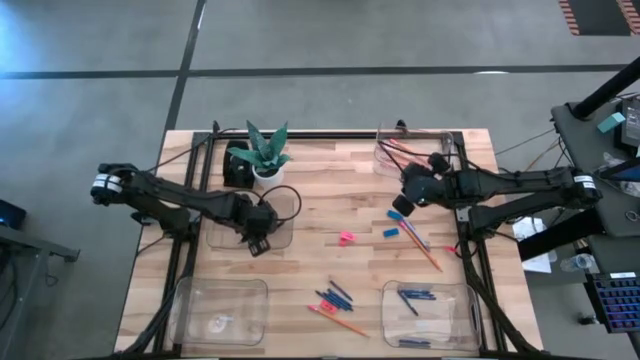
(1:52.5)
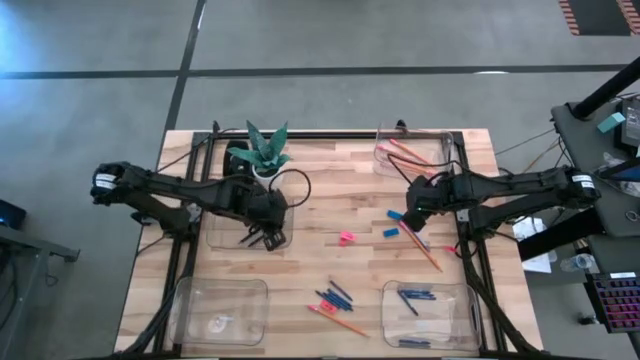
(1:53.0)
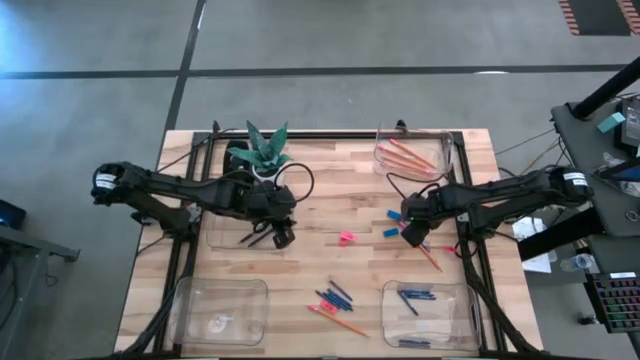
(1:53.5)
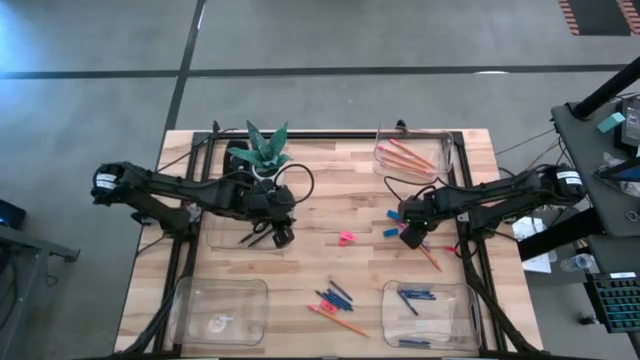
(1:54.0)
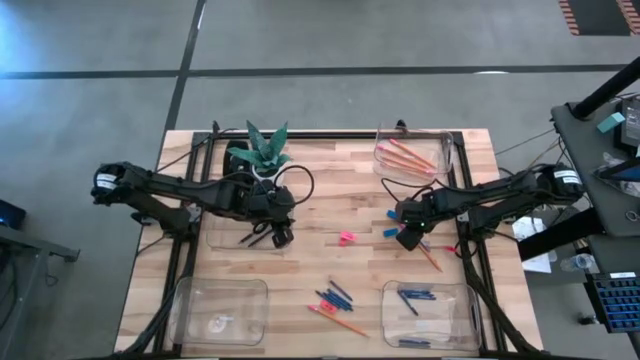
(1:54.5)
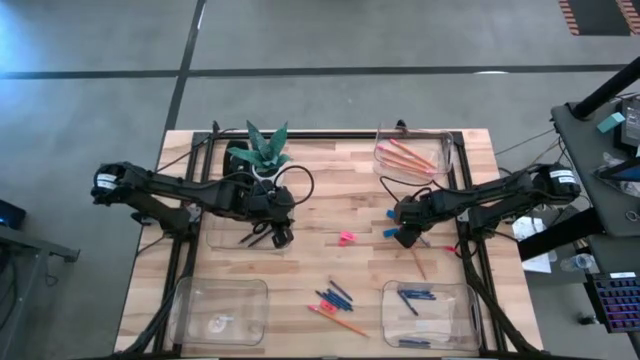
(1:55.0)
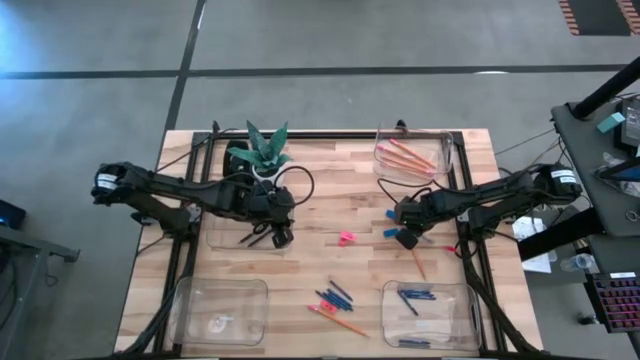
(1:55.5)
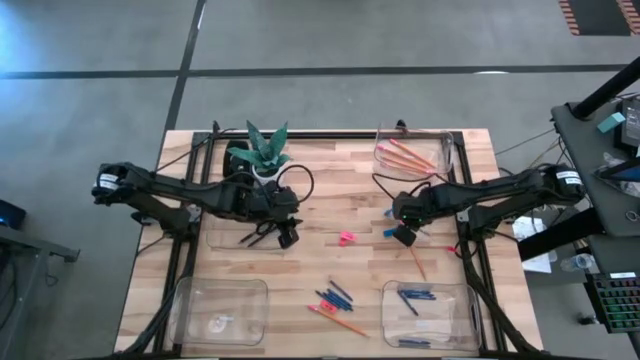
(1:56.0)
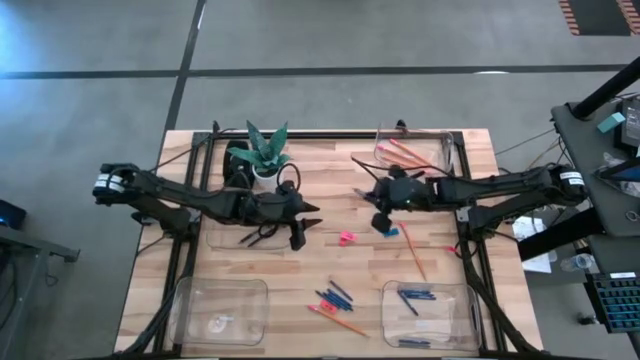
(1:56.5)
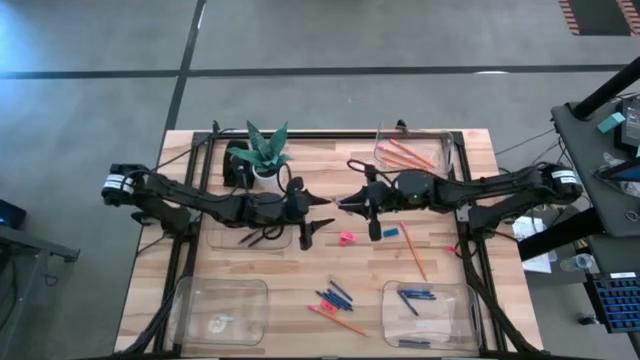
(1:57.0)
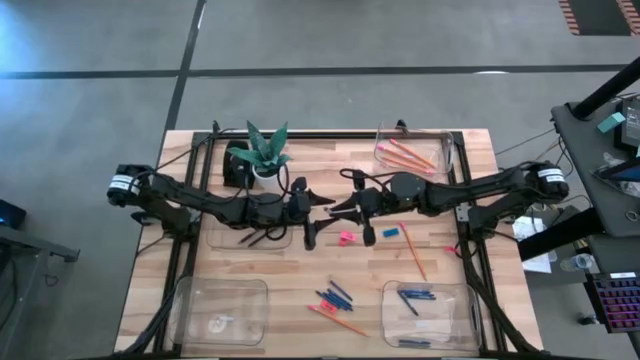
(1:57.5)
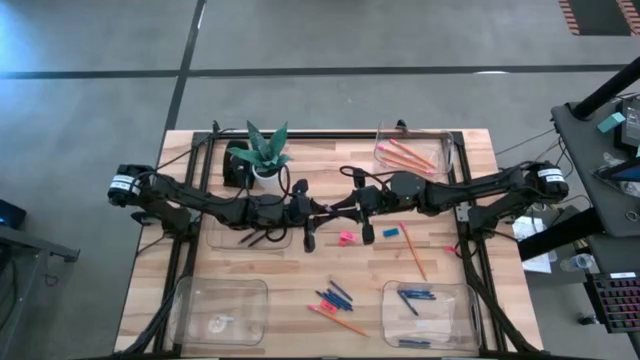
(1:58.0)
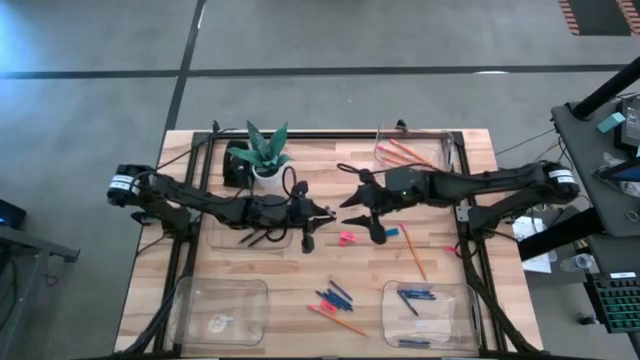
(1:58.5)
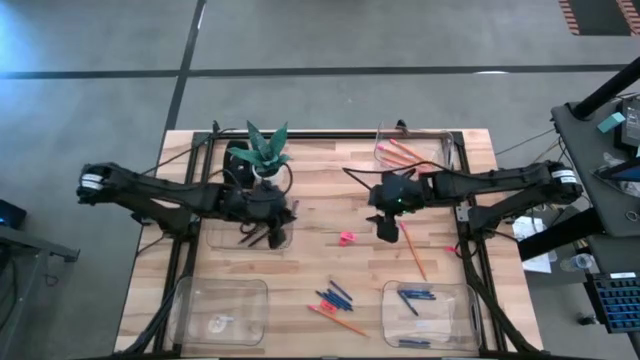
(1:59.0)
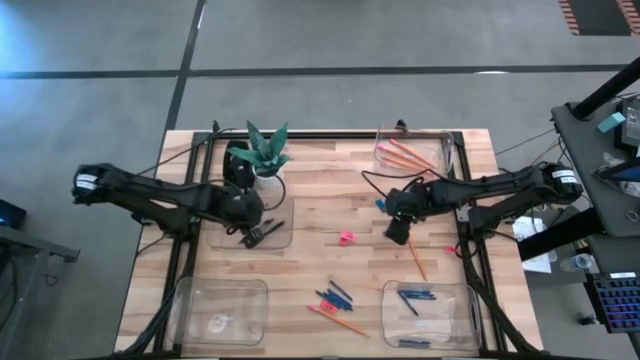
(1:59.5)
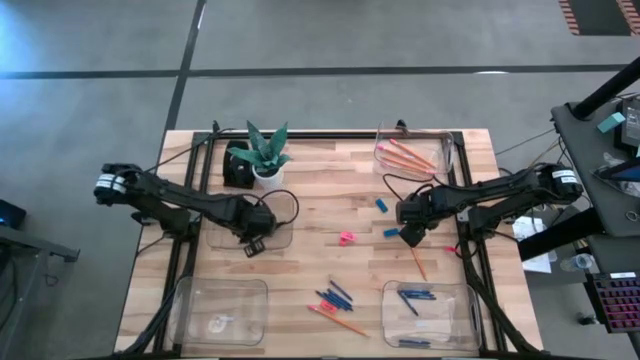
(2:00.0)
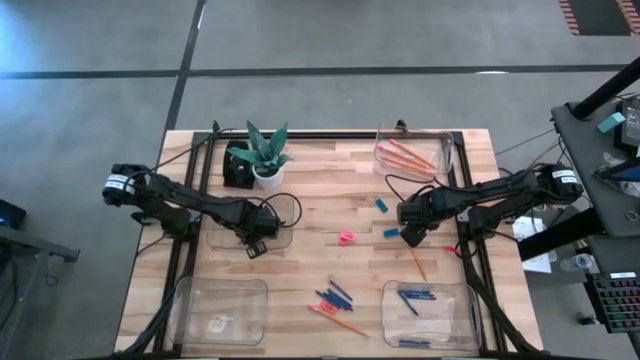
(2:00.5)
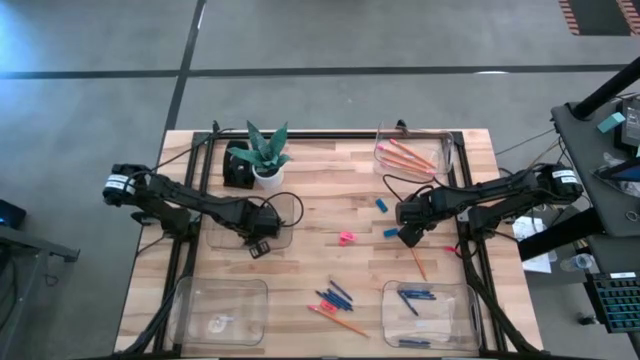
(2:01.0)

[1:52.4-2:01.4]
Task: Sort crayons/erasers/pens/pencils in bins
Put the grey pen into the middle left transparent bin

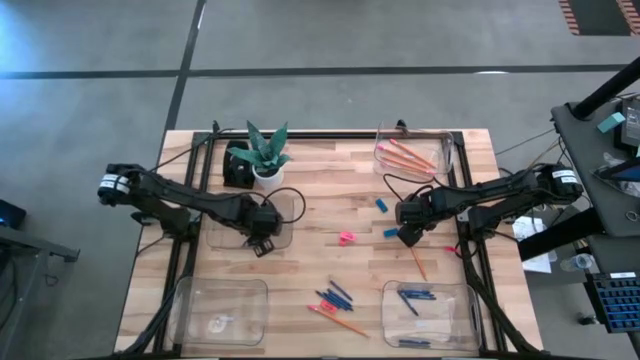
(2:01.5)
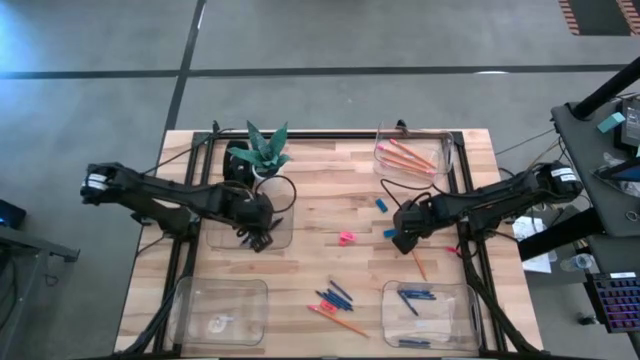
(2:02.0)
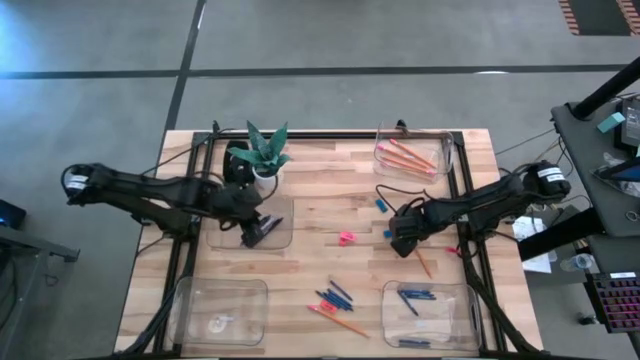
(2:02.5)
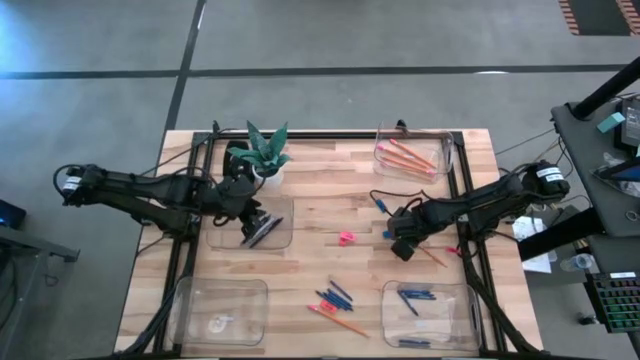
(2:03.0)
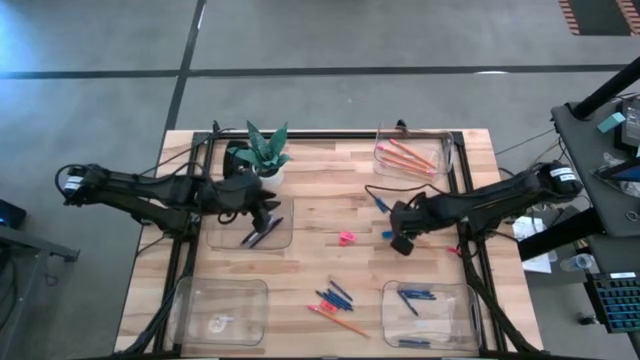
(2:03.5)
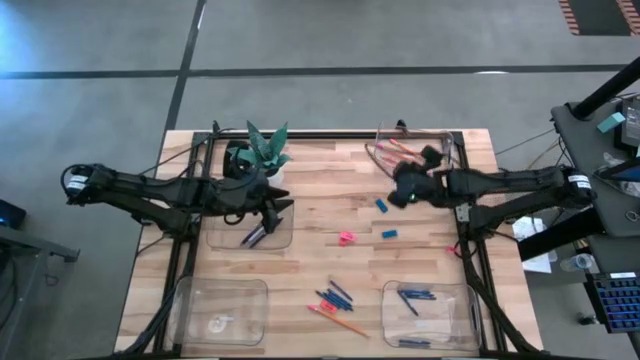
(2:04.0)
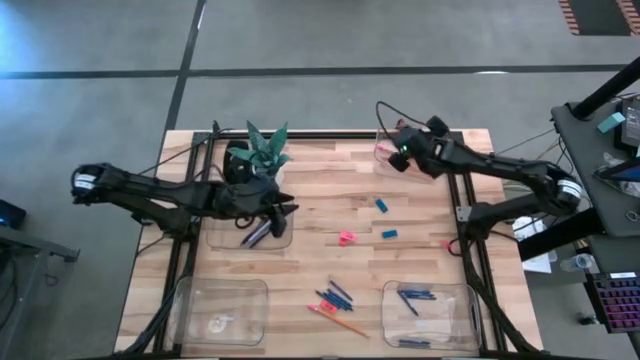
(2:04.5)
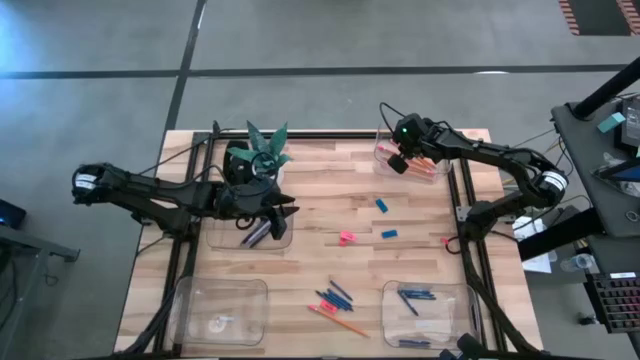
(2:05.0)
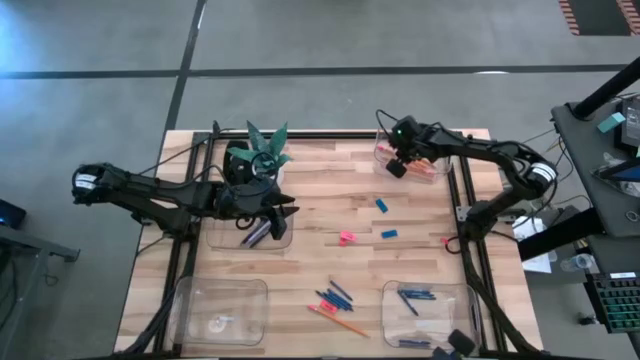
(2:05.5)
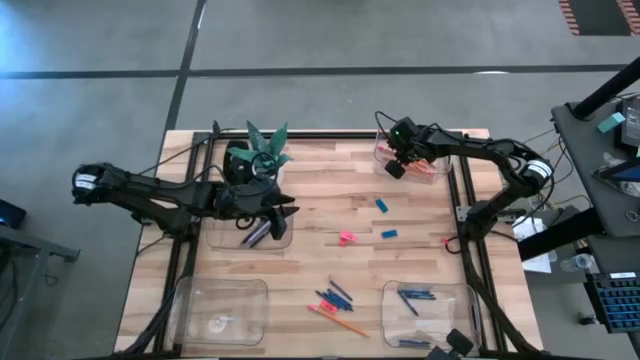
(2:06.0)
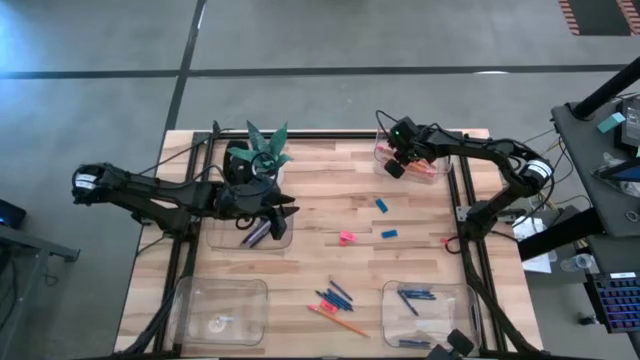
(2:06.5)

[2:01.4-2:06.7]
Put the orange pencil into the top right transparent bin

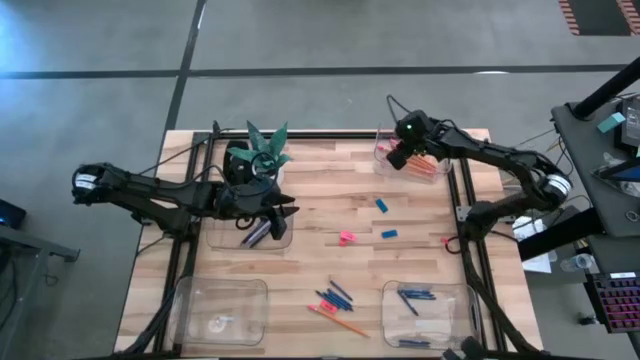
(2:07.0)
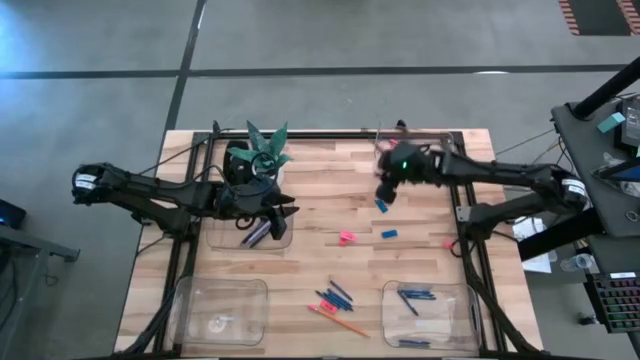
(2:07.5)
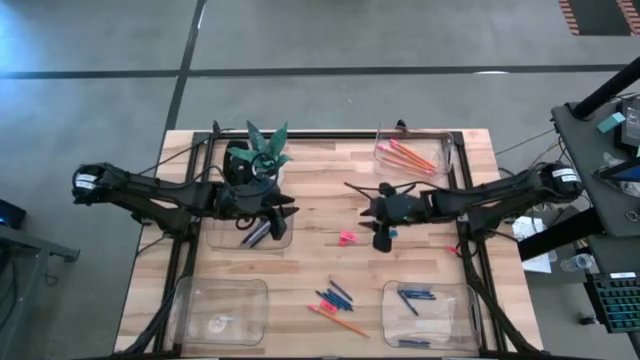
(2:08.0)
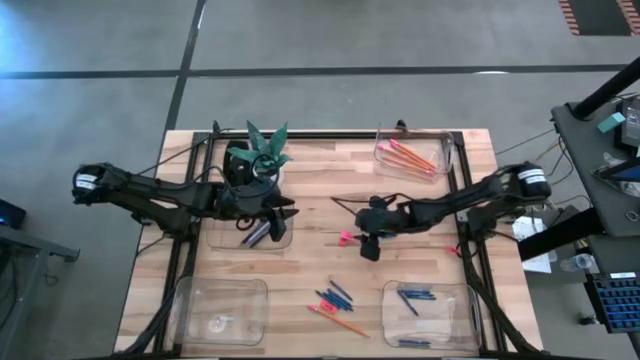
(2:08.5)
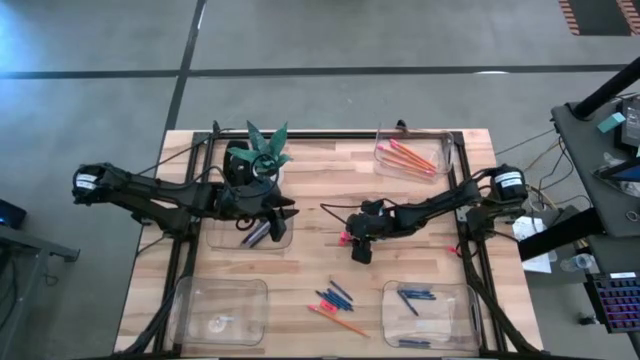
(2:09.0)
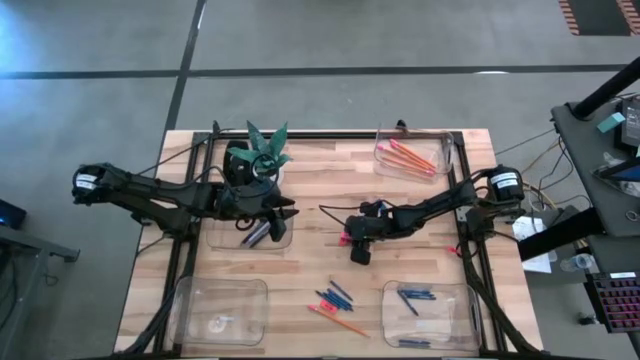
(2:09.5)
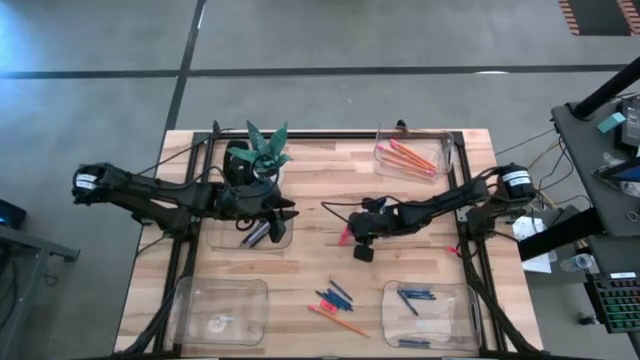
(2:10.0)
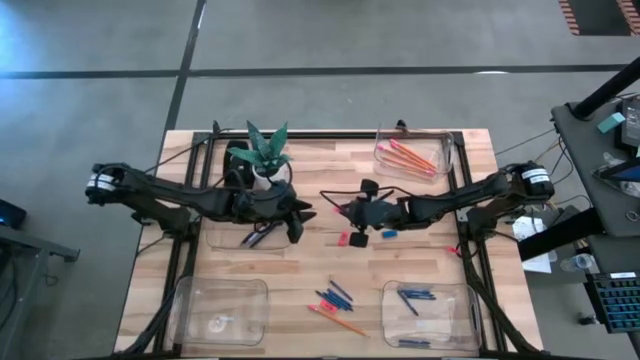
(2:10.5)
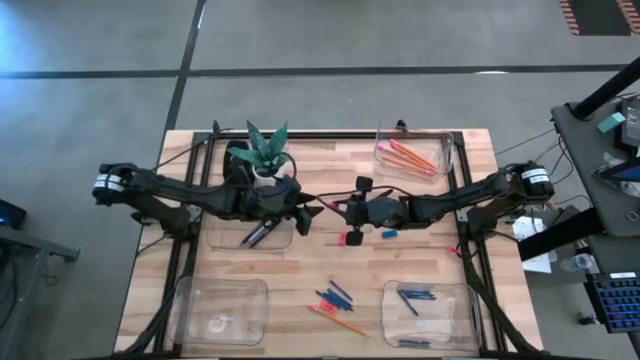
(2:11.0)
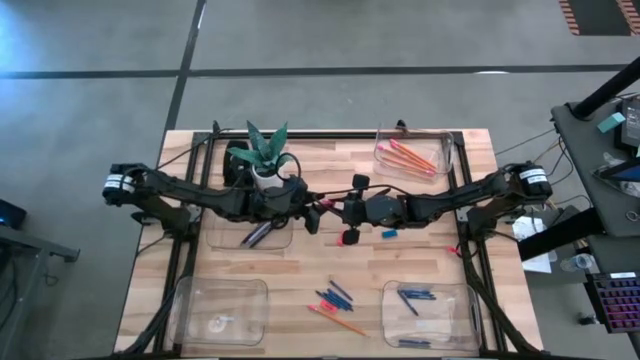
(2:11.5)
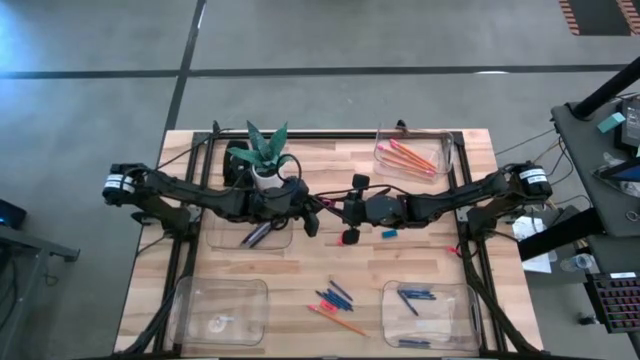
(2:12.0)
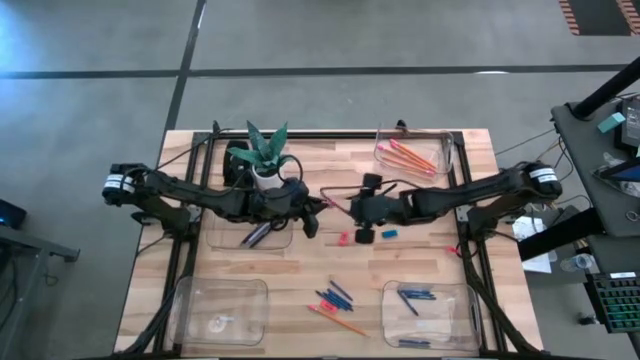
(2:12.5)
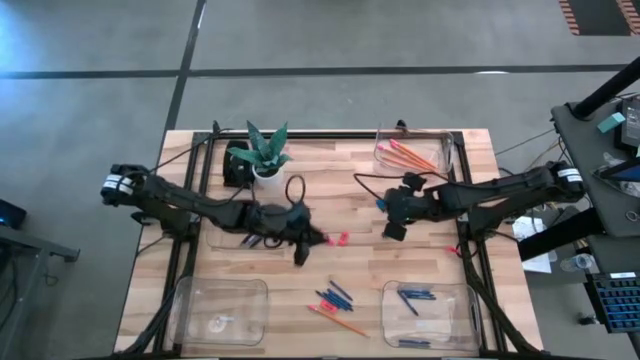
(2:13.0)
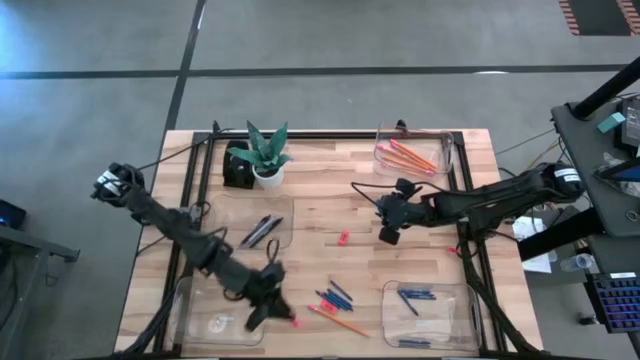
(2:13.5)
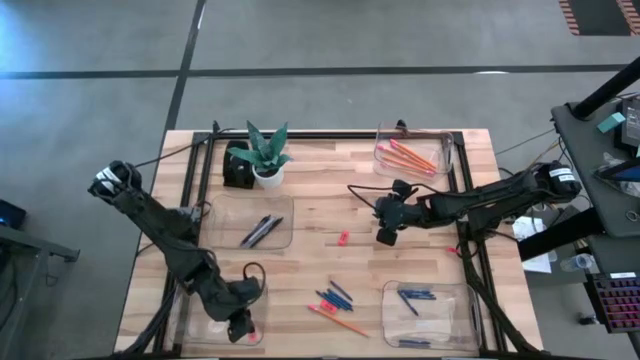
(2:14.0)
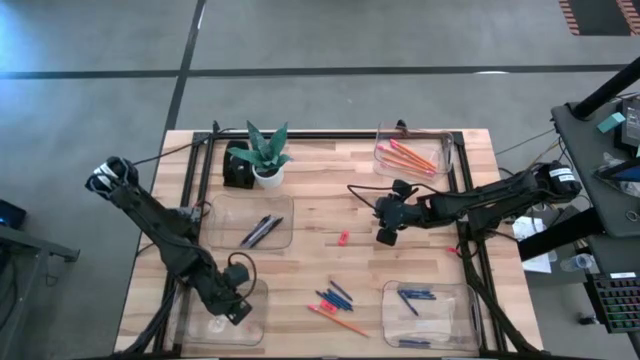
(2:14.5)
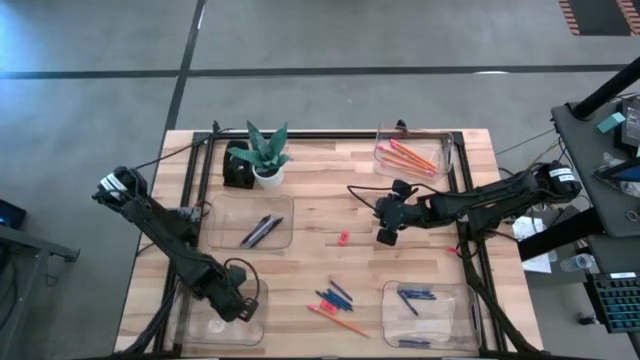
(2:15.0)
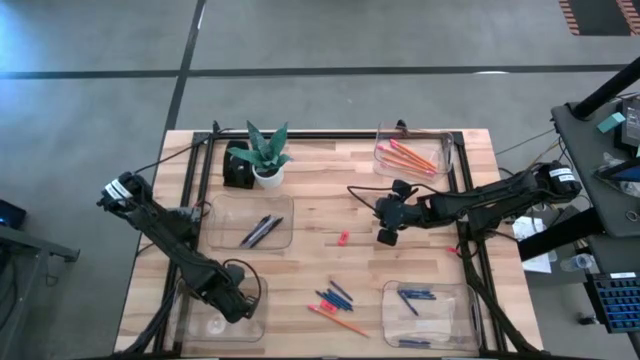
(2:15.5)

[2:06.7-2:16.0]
Put the pink eraser into the bottom left transparent bin
